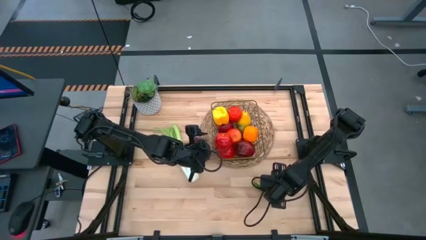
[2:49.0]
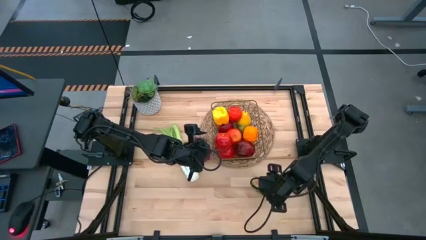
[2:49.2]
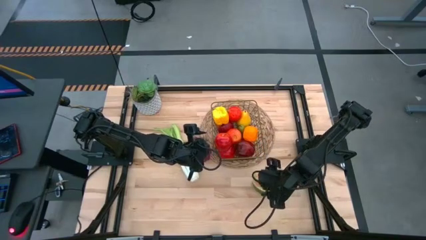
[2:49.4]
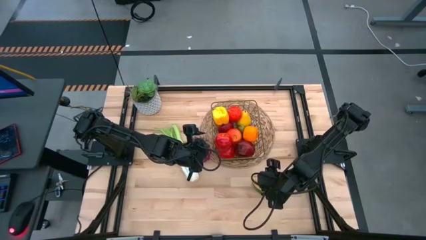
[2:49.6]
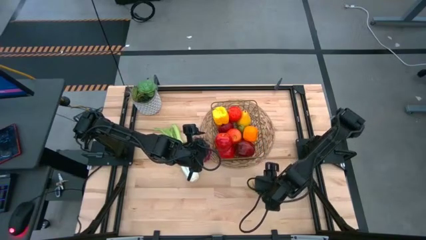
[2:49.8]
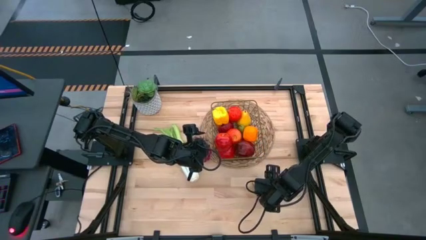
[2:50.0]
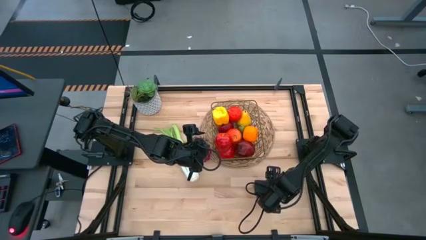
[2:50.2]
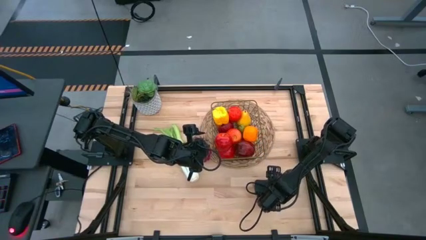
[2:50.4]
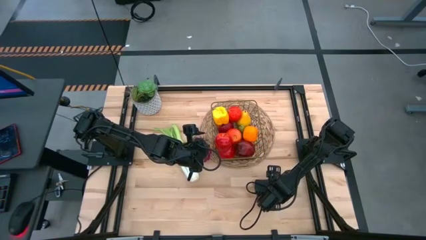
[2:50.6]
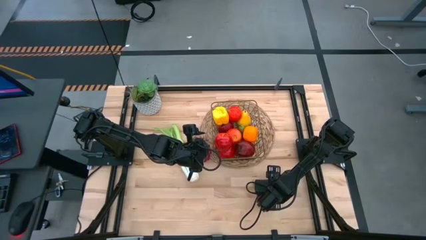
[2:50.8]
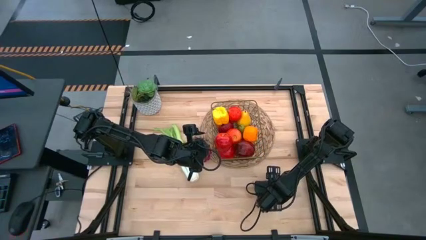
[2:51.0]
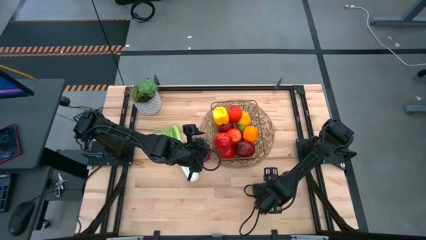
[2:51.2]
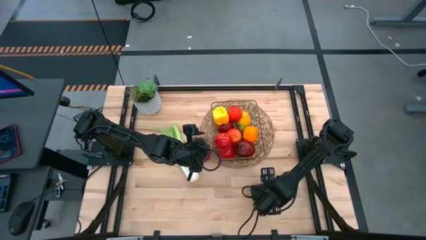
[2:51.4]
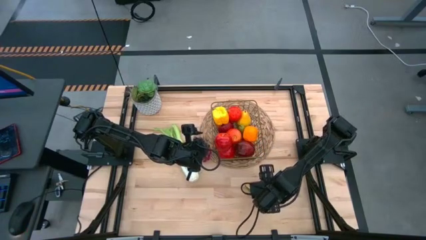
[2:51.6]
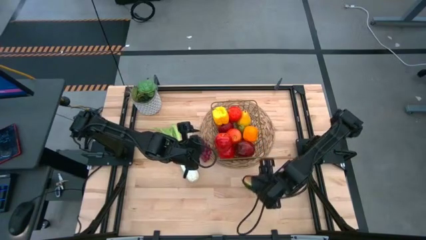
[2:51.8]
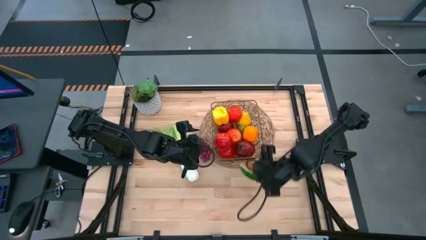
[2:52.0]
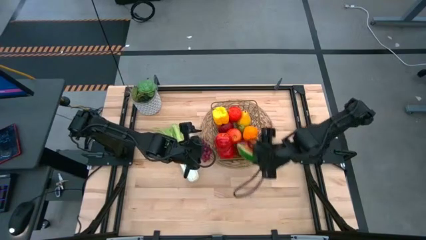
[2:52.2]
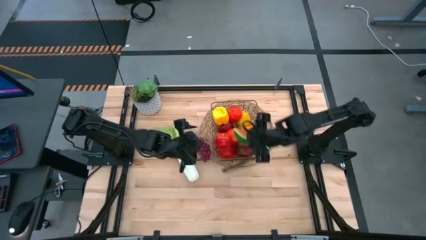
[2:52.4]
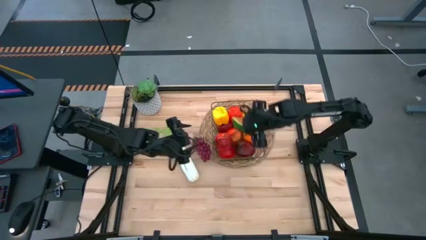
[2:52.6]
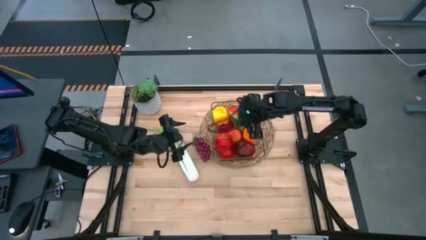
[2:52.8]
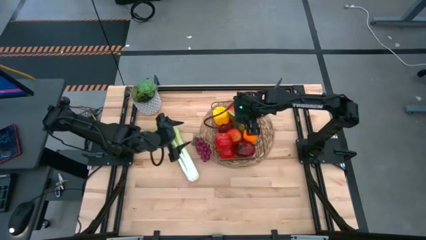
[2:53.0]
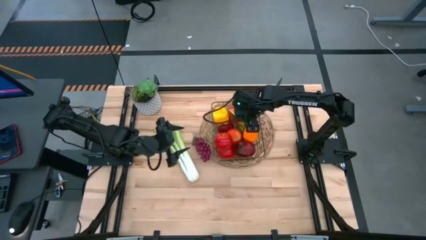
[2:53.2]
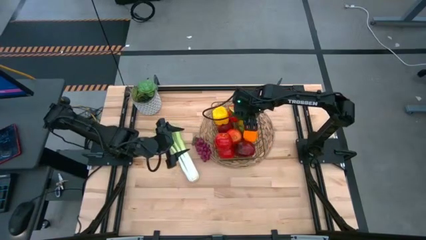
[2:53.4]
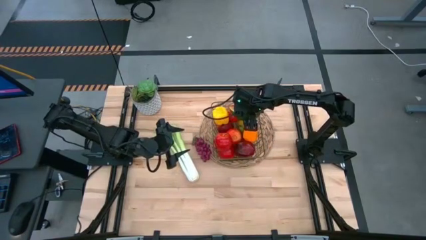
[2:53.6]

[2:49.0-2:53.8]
Task: Build produce basket
Put the watermelon into the wire basket

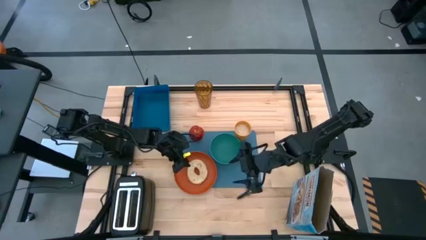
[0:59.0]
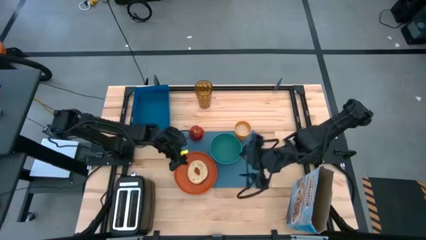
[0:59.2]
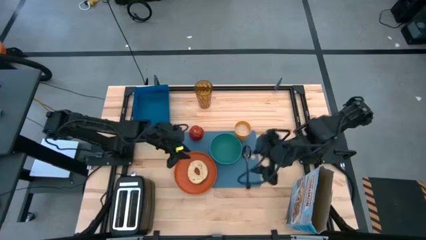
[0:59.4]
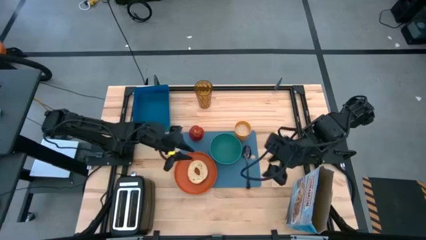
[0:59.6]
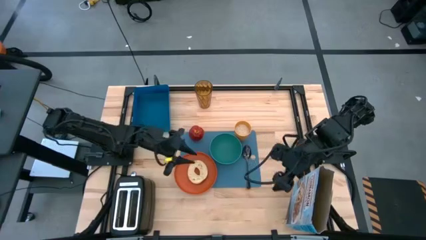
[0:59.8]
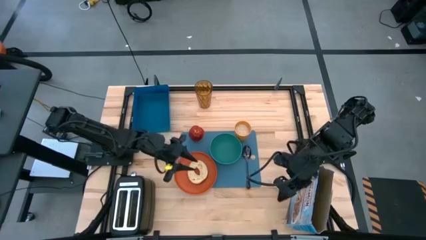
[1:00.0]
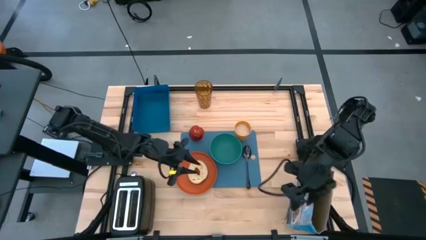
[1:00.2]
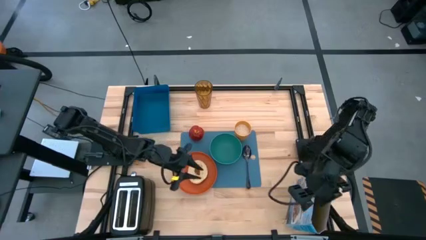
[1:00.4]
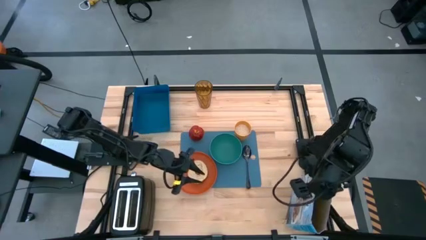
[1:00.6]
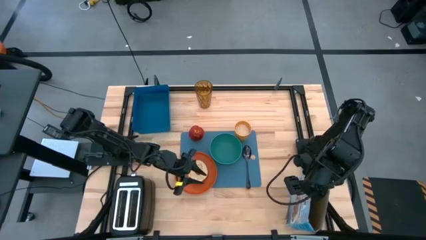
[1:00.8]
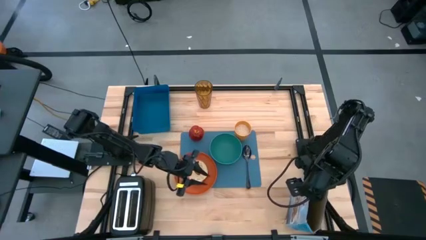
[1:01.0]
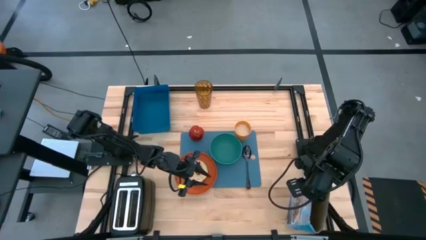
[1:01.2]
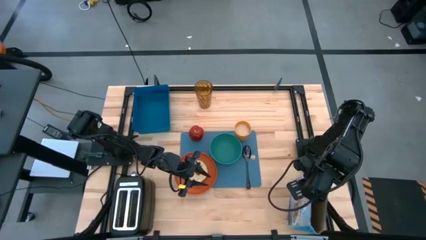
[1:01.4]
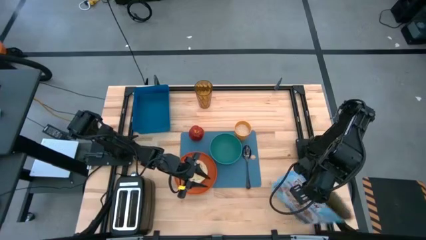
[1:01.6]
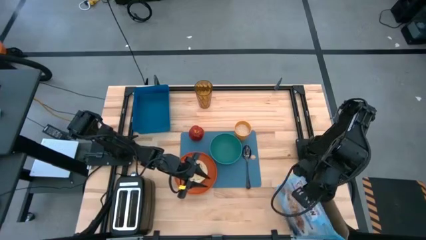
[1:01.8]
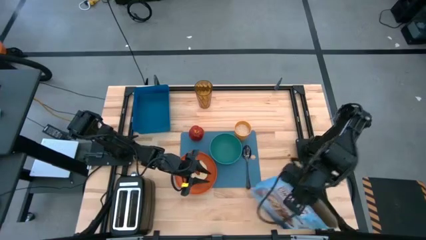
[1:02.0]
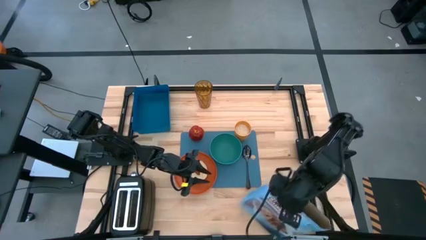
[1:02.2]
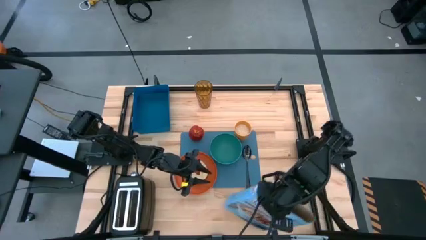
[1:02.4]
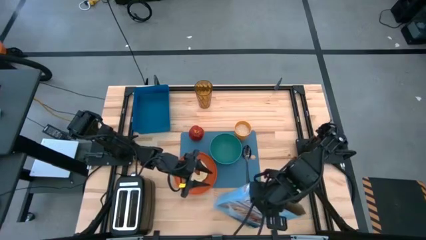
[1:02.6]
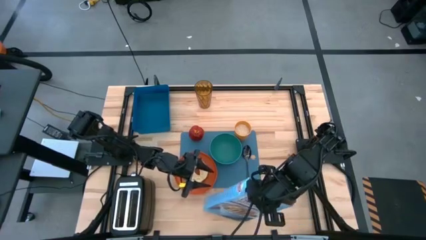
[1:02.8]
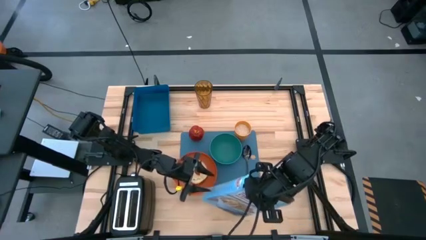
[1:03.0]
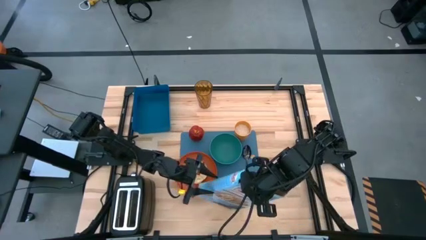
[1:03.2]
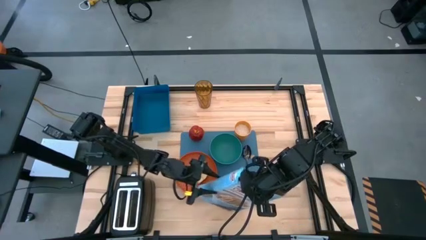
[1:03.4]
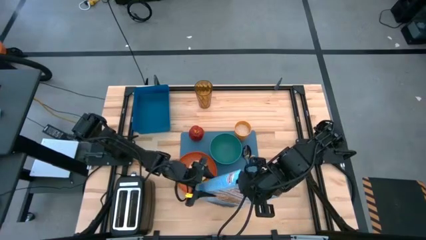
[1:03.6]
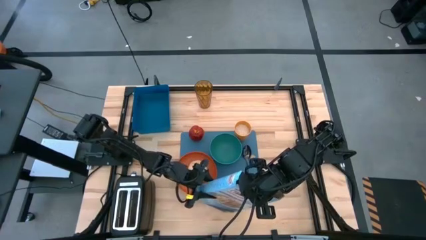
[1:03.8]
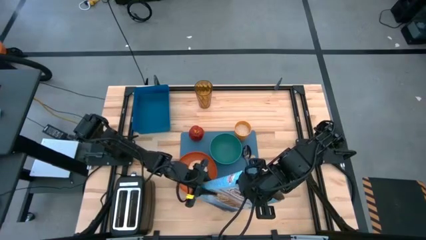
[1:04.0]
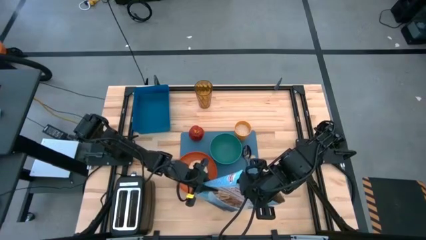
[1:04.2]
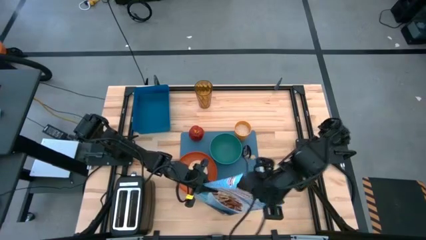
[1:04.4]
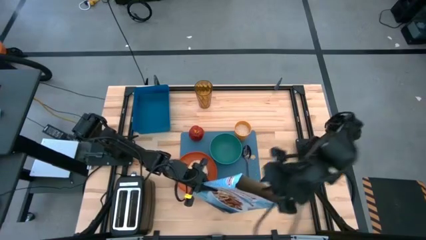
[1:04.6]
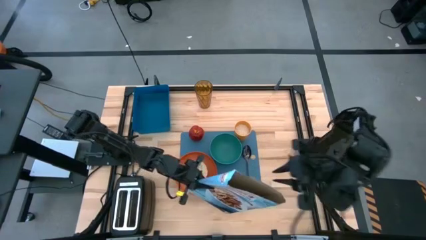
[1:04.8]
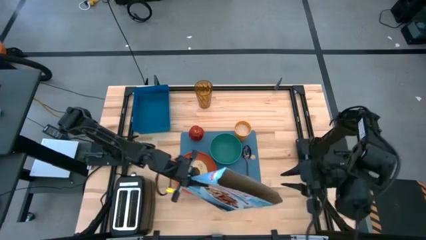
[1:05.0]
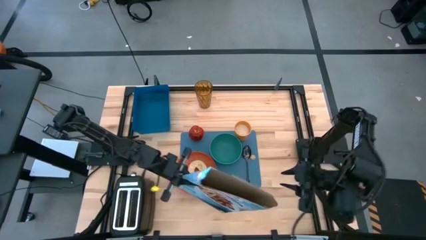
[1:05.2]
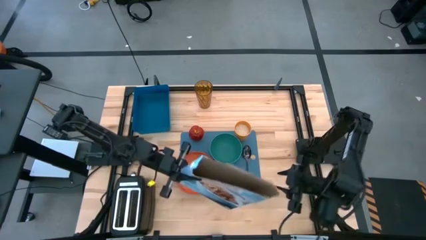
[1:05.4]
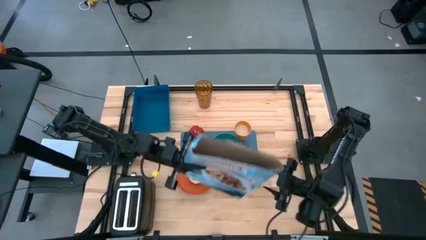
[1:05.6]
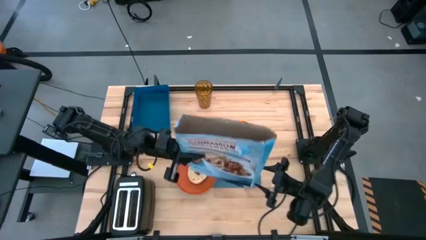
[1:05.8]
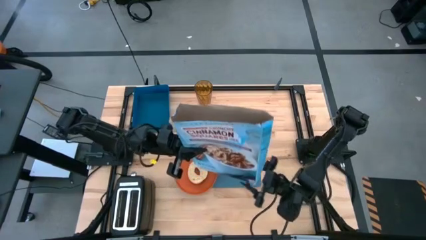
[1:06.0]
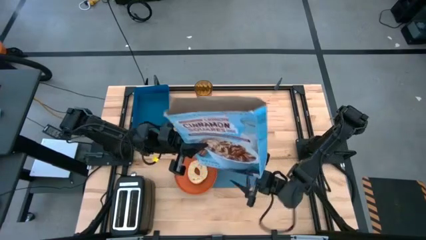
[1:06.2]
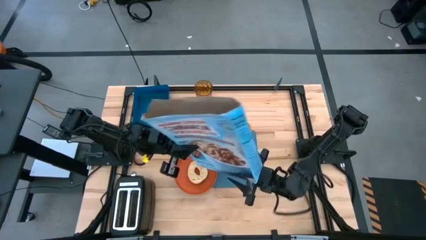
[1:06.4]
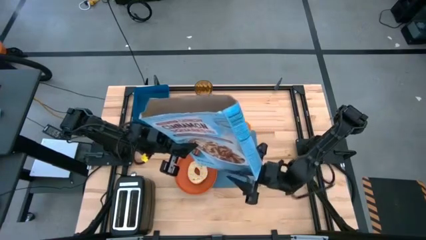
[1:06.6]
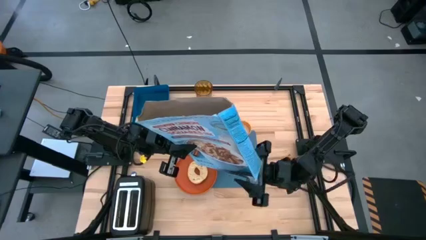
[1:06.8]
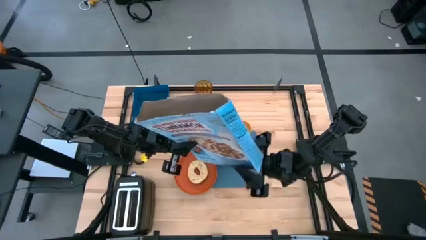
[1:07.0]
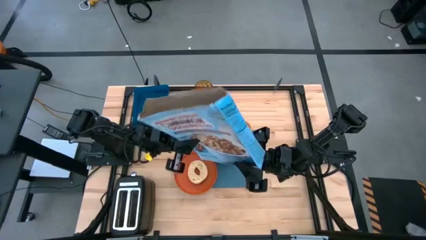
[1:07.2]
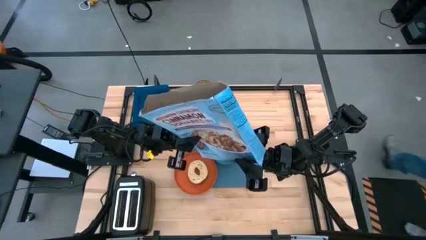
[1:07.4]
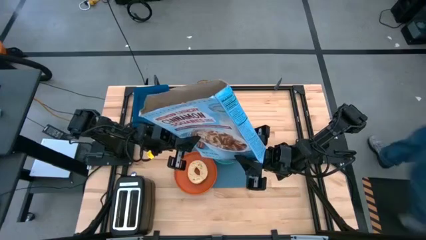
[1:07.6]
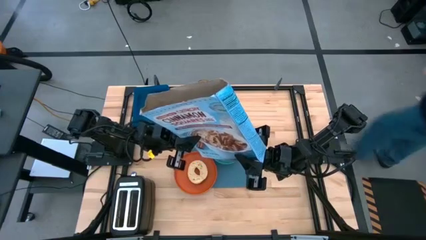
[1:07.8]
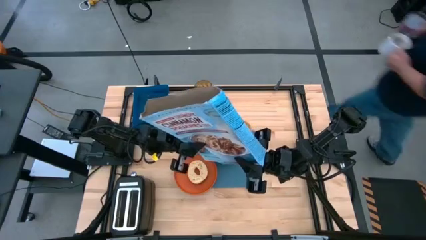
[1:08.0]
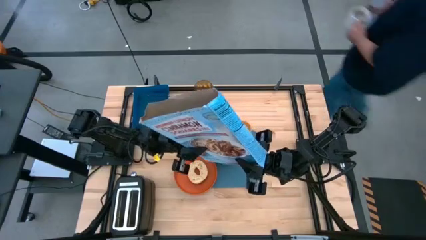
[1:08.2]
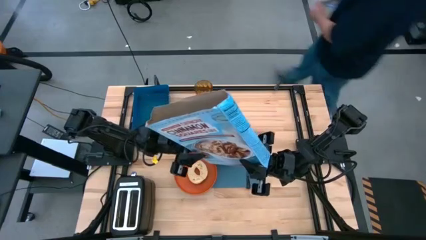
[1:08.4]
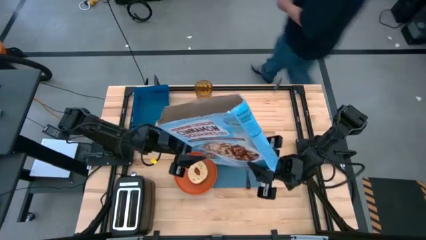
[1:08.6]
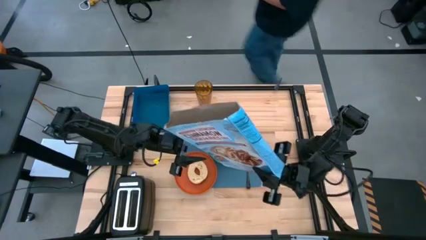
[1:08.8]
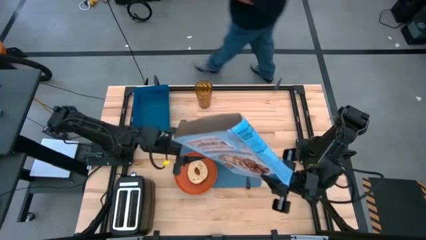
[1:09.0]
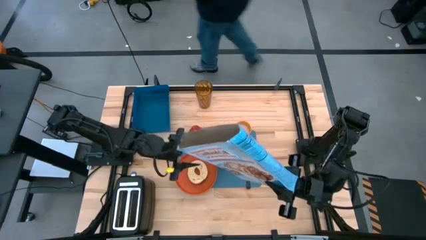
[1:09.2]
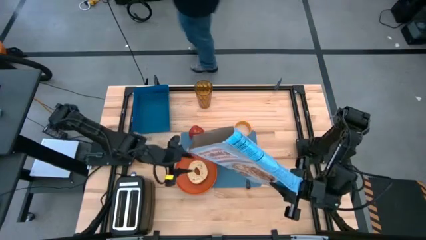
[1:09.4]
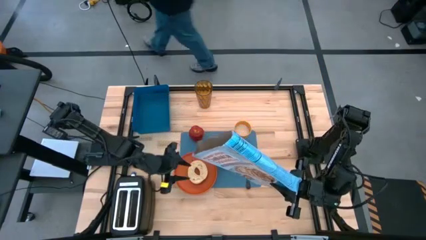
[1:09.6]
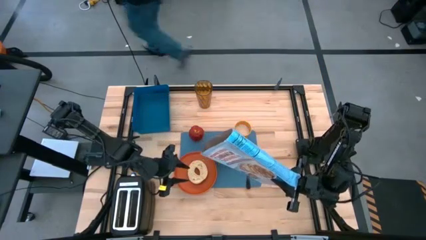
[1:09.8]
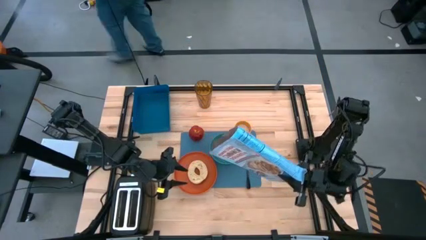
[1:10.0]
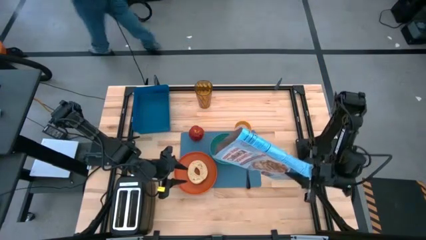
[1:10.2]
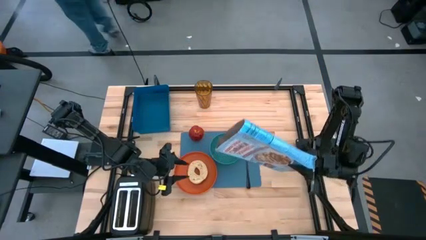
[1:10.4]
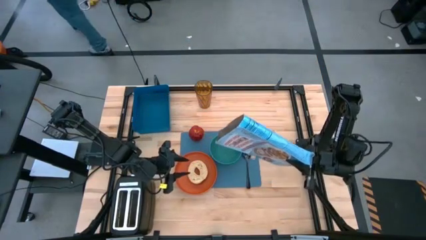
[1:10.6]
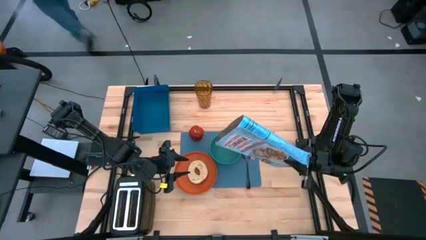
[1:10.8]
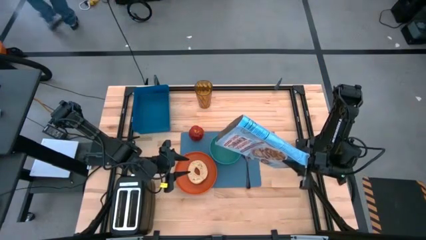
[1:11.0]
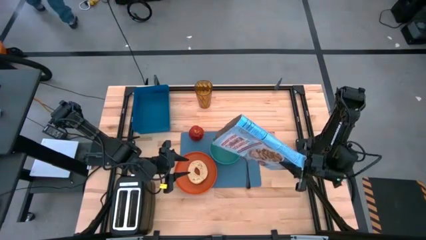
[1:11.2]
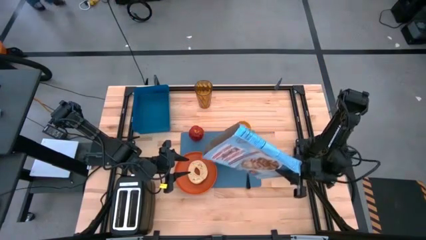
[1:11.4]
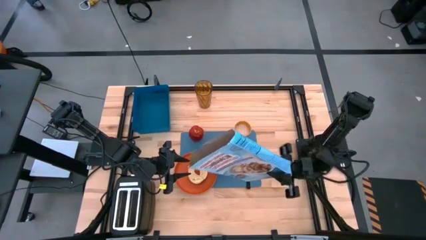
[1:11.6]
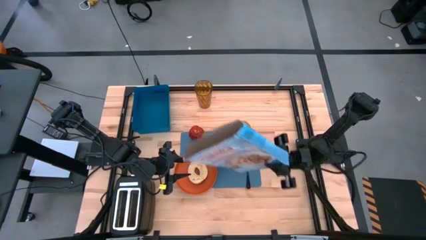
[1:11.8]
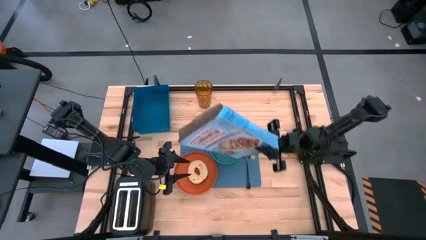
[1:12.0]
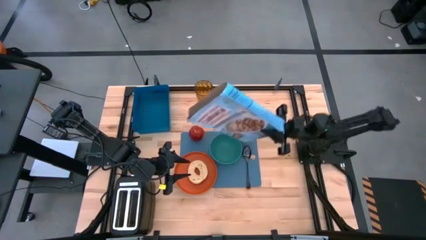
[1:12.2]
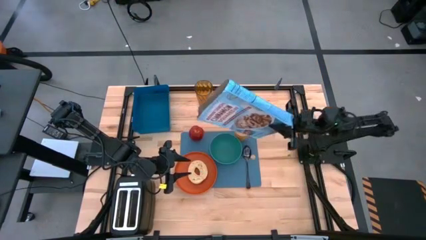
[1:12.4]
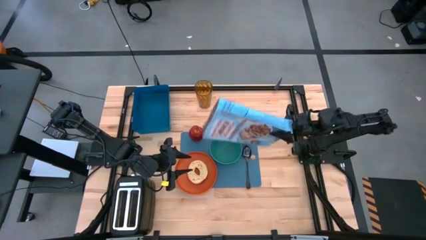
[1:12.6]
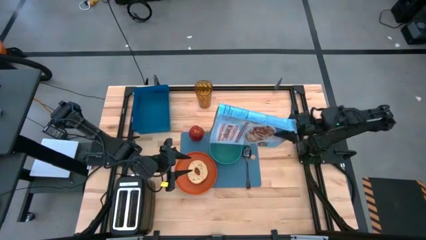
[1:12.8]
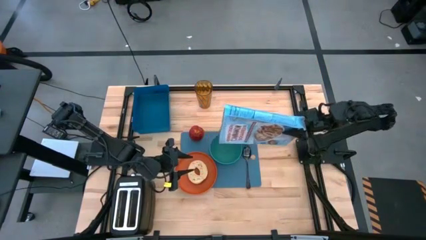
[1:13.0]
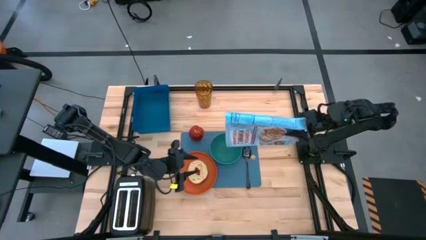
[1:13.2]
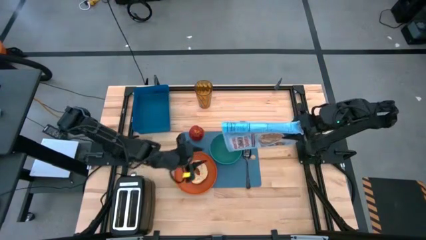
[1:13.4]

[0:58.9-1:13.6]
Task: Arrange a breakfast setting
Pour the cereal into the green bowl
